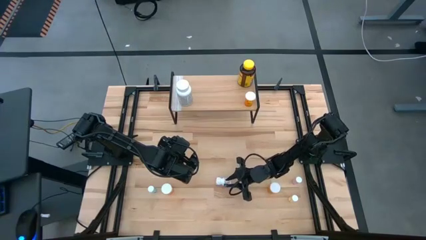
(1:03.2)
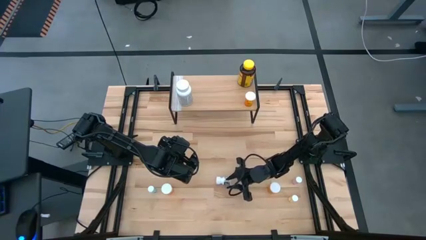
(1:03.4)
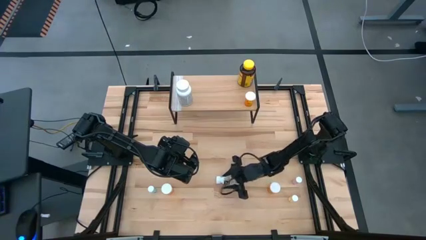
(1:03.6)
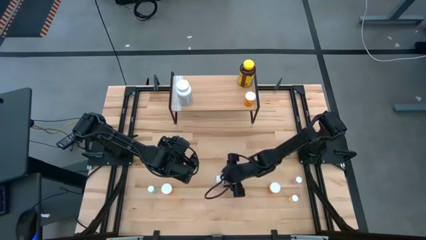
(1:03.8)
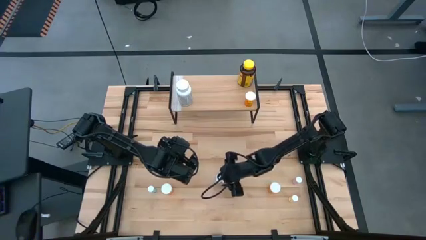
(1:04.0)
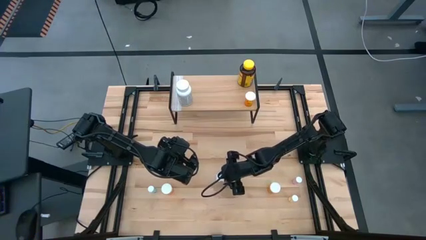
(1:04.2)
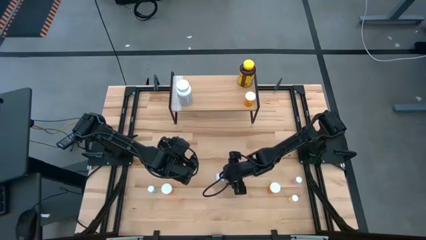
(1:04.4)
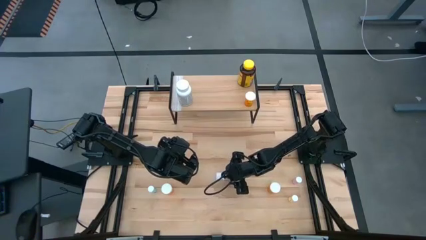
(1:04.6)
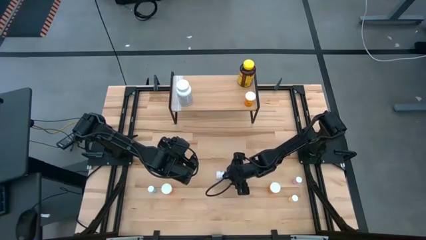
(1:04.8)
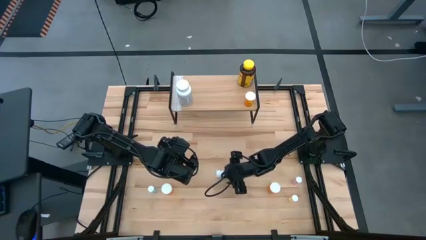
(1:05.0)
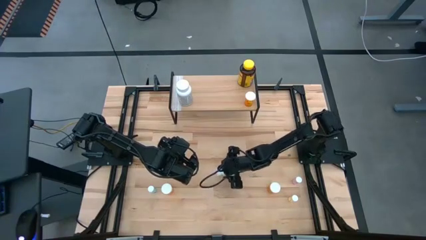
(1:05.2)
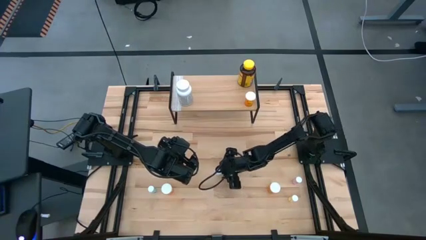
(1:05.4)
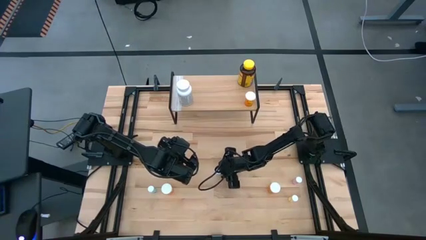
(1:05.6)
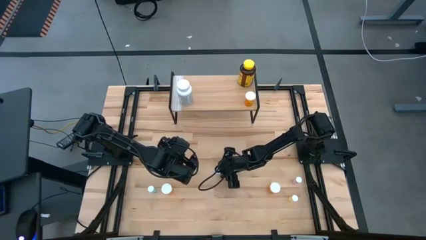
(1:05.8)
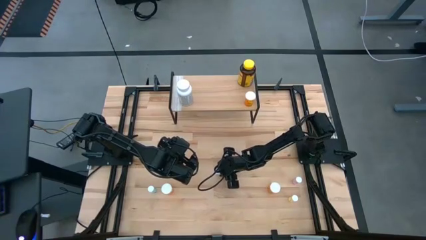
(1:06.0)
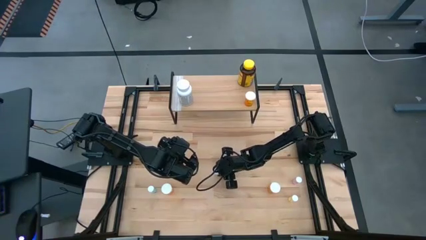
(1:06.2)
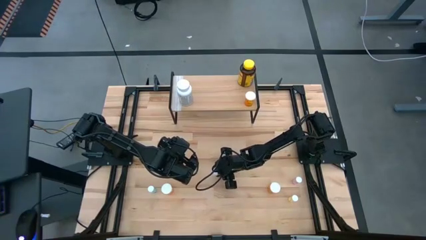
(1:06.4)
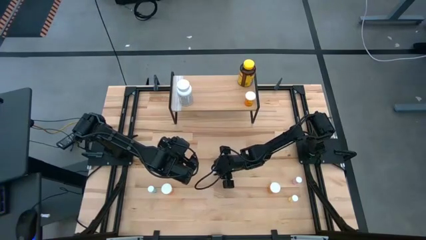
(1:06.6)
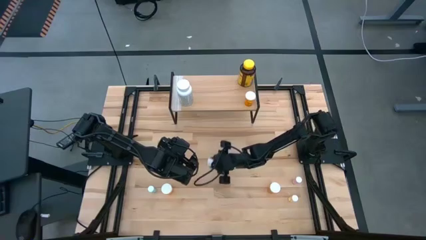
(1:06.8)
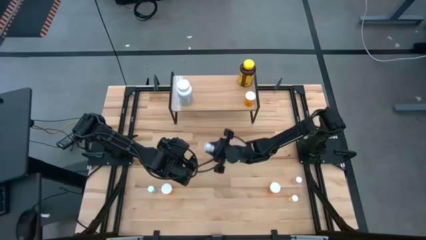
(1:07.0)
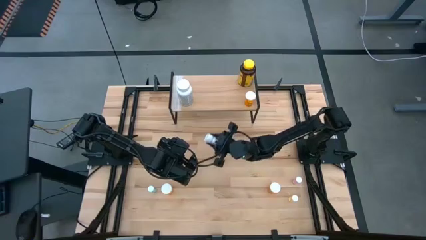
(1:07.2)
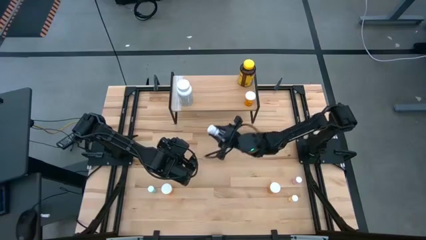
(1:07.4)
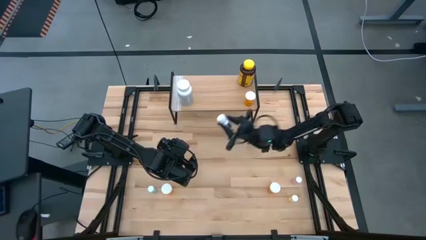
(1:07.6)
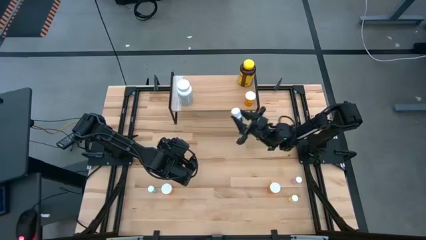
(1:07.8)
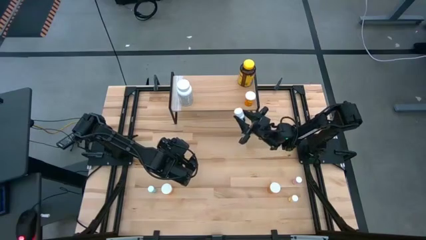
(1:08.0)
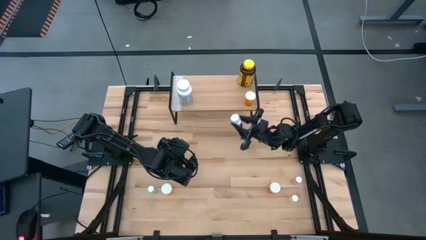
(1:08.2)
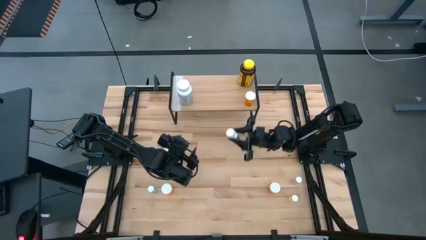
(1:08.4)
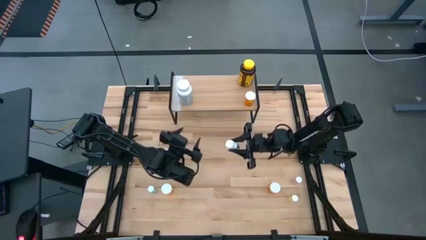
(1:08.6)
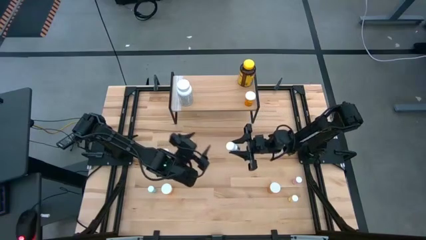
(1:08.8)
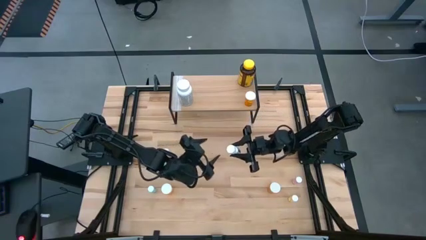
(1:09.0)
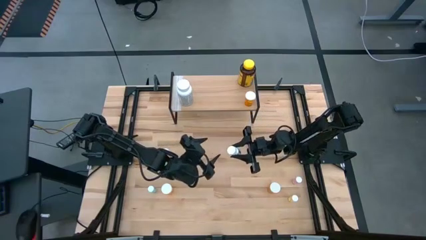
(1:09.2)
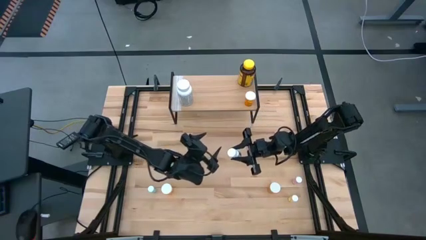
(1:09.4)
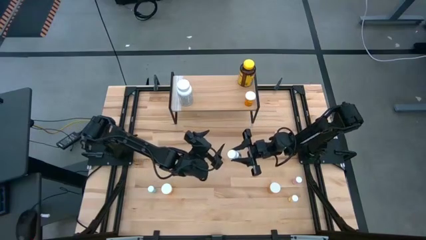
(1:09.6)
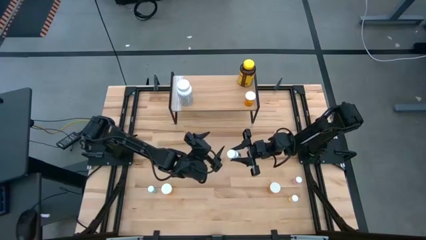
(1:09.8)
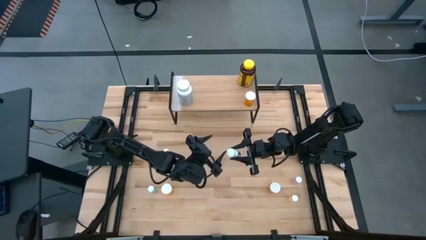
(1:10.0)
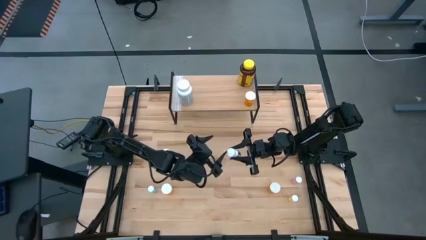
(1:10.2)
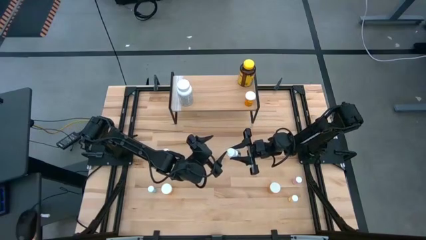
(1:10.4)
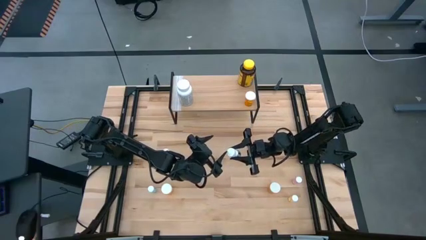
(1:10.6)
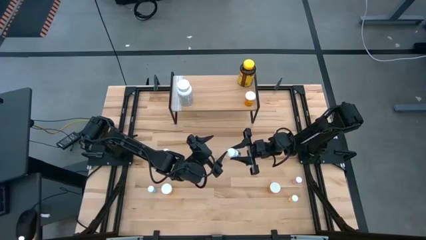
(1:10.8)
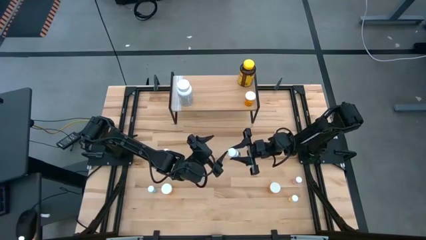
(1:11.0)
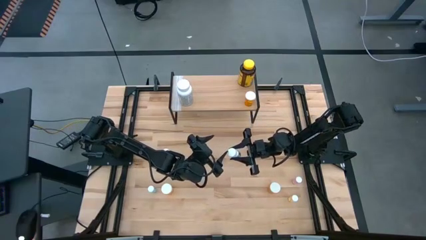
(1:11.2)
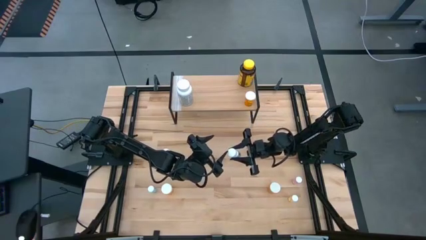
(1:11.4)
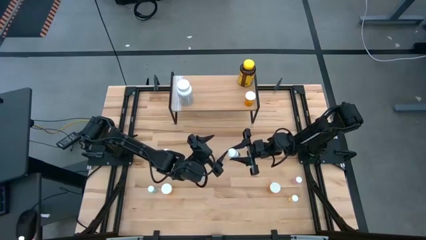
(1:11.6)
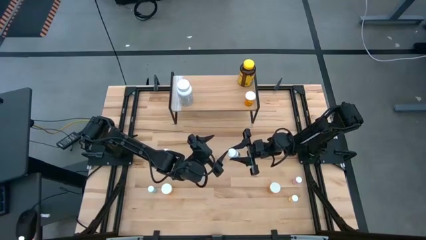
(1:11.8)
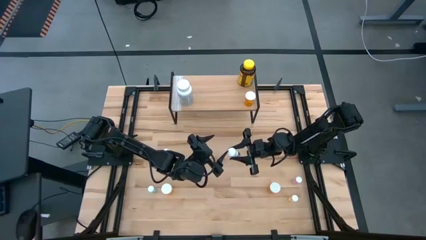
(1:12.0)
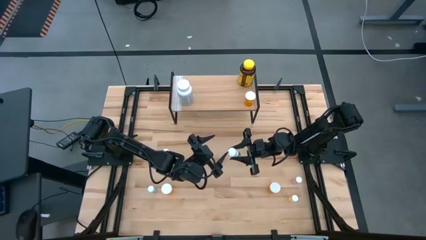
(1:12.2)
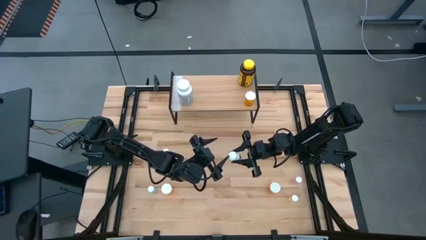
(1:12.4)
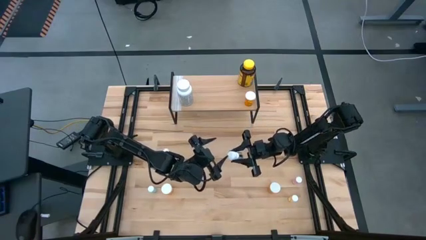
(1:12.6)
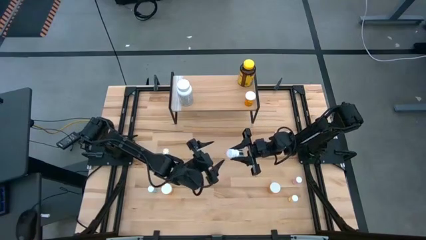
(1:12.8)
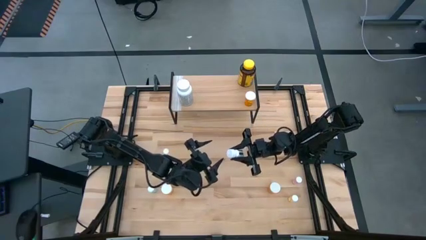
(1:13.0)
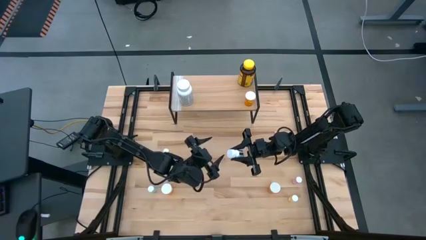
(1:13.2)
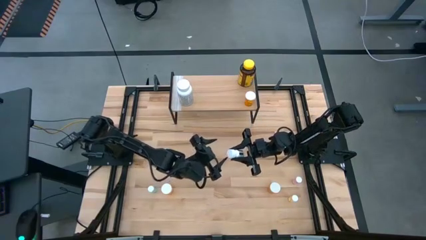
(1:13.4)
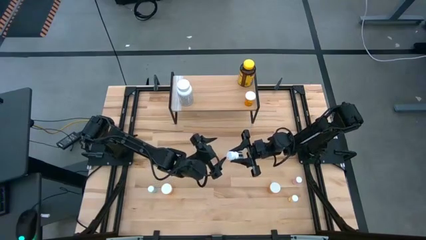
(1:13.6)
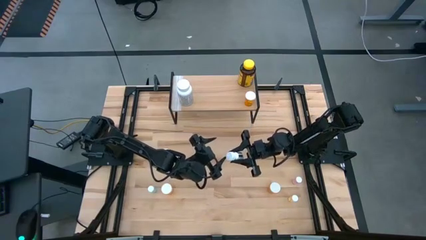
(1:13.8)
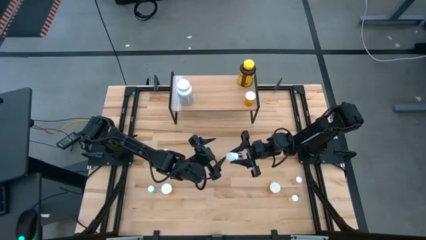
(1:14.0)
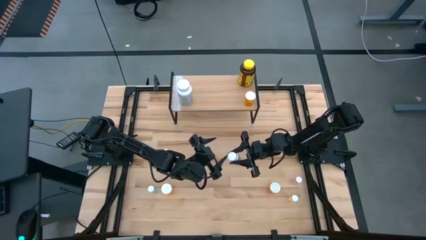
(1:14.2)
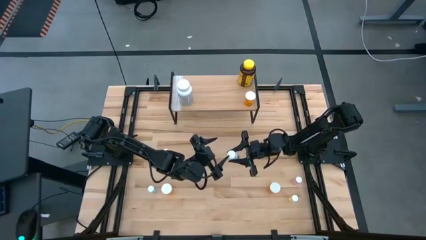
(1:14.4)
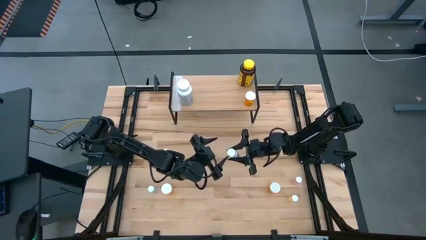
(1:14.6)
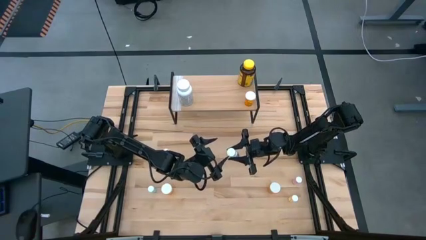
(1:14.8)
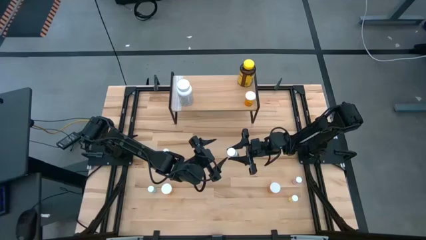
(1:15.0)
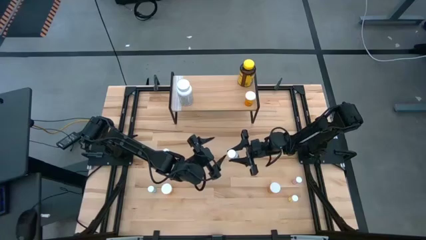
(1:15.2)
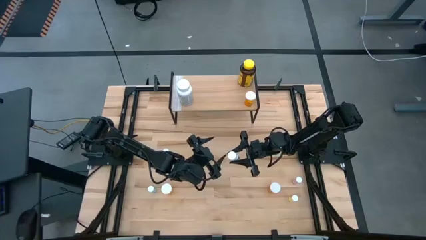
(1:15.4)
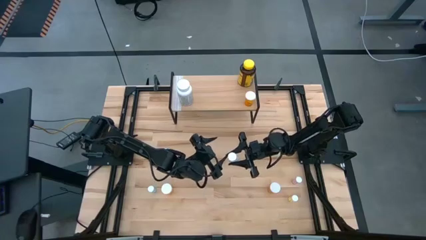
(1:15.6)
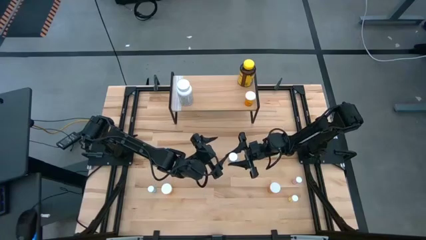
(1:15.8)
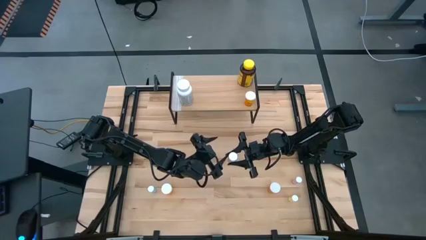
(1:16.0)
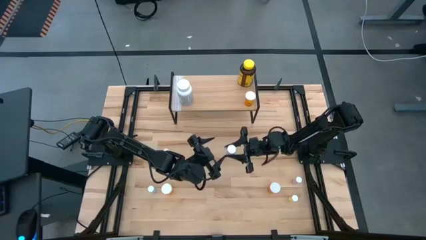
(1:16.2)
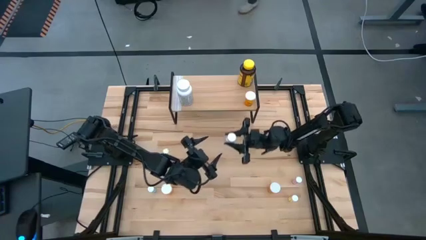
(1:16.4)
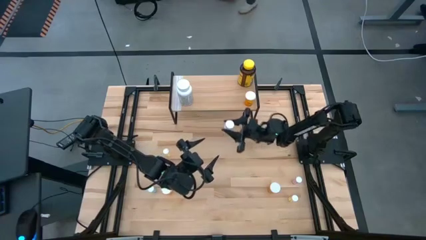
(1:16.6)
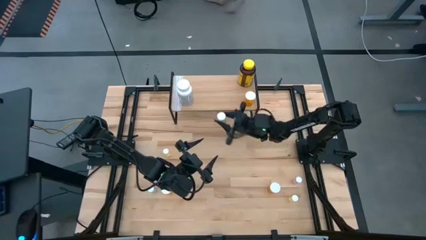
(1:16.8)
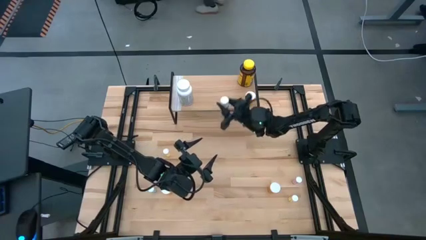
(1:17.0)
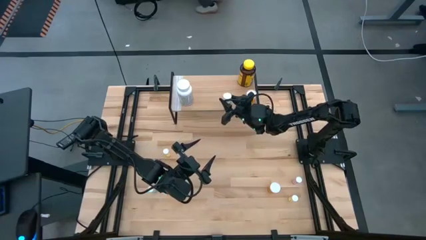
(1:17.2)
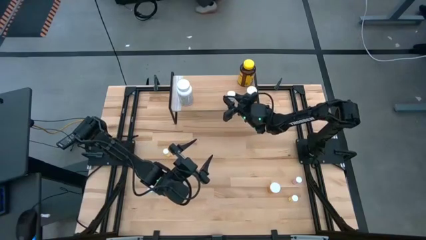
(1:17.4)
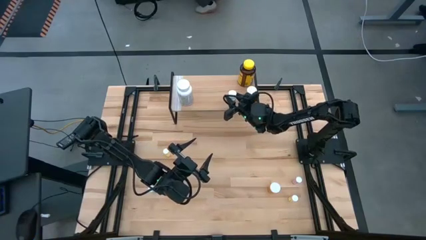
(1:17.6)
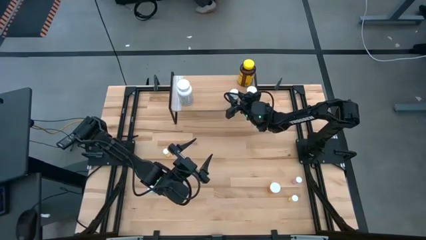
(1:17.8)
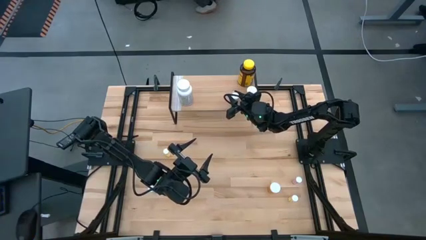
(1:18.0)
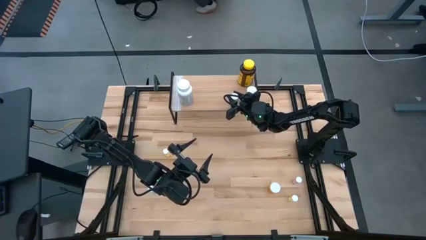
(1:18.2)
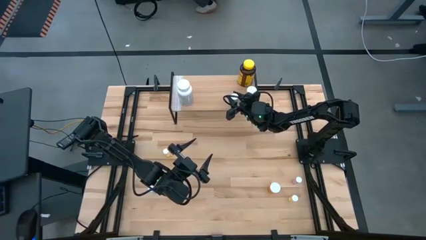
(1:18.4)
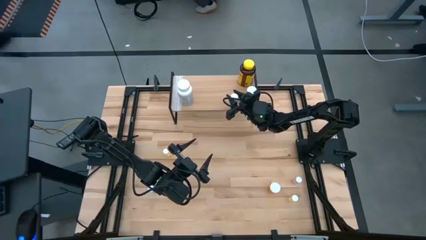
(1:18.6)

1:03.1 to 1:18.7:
Task: Pick and place medicine bottles onto shelf by color
Put the small white medicine bottle on the shelf
